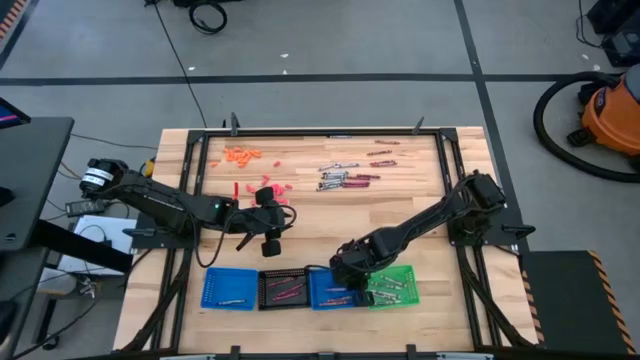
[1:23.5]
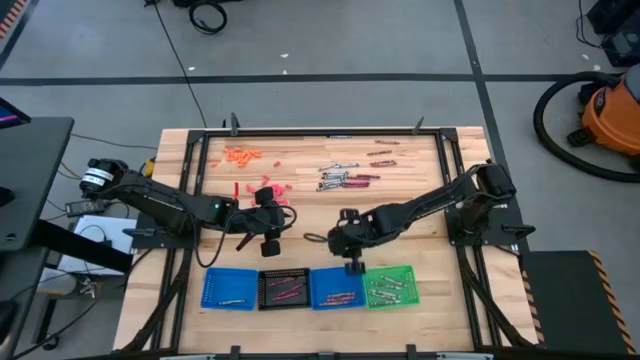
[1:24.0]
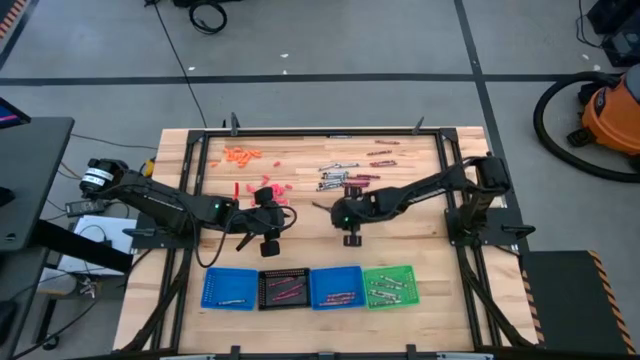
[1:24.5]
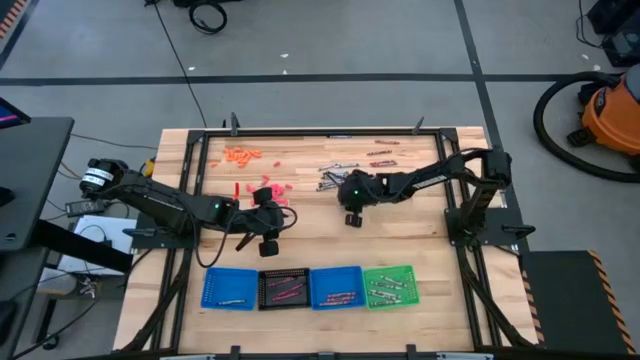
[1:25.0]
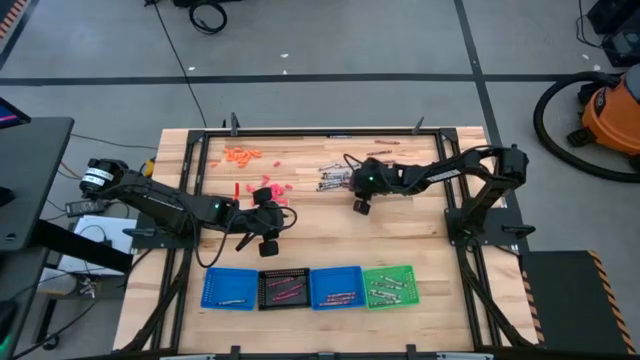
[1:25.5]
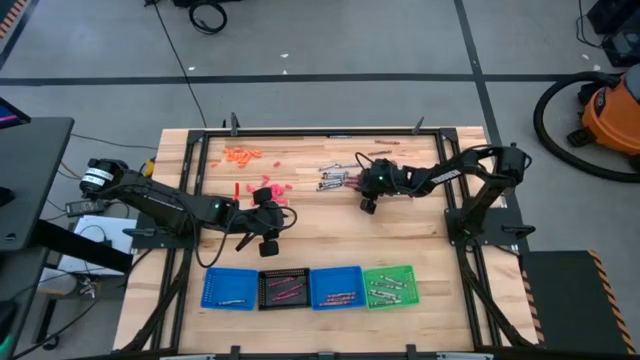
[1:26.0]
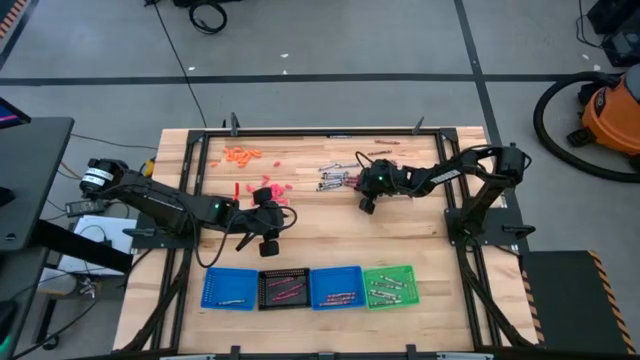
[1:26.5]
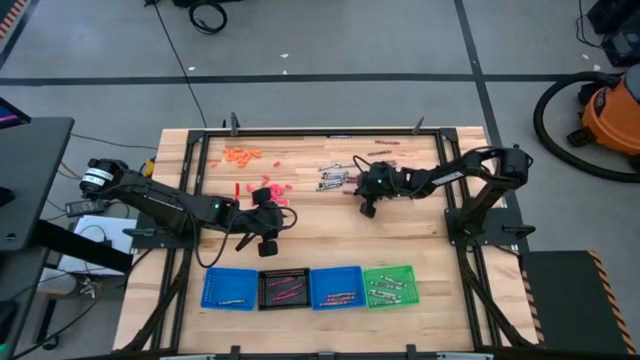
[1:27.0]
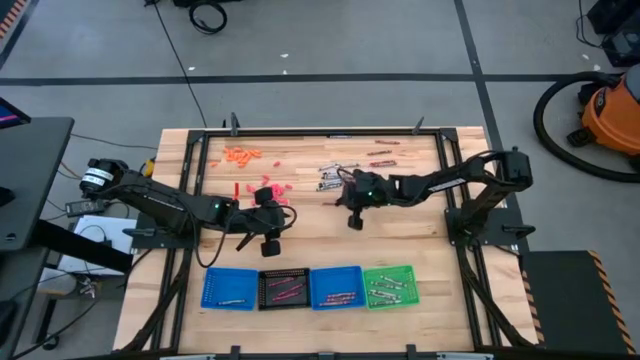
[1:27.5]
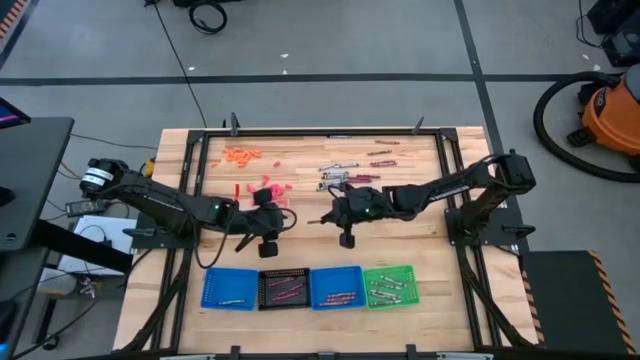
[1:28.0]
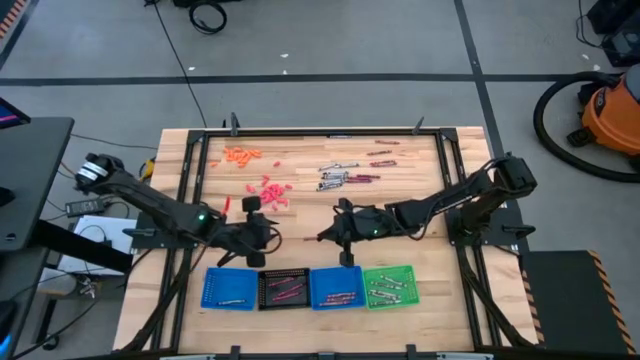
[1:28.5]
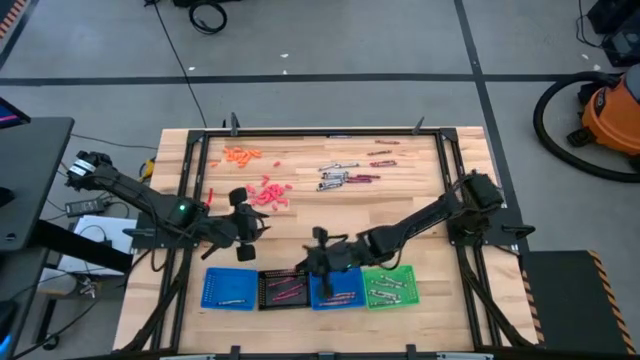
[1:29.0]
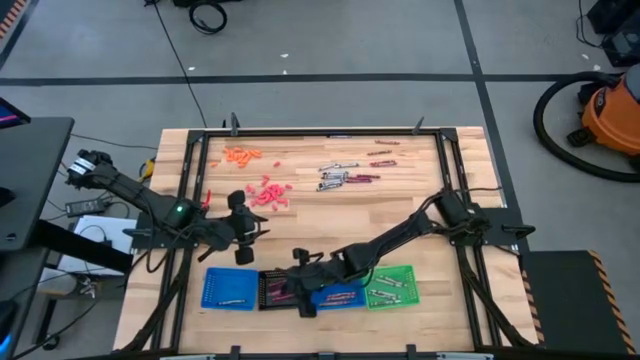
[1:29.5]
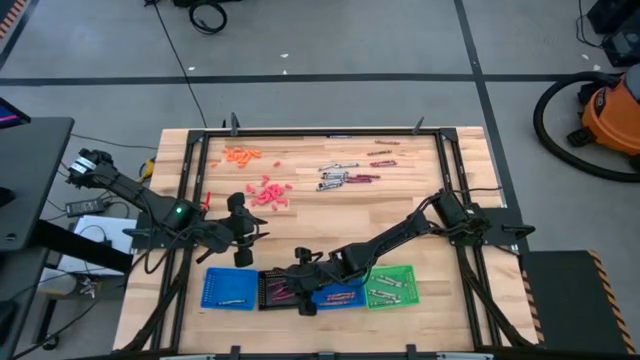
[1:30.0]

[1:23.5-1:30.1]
Task: Sort crayons
Put the dark pink crayon into the black bin

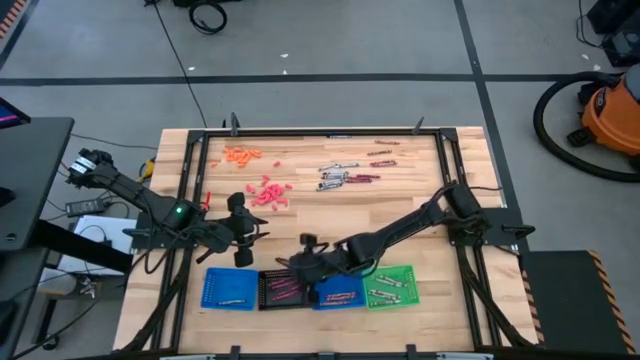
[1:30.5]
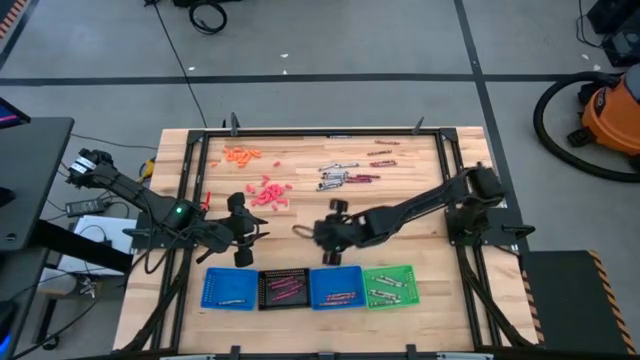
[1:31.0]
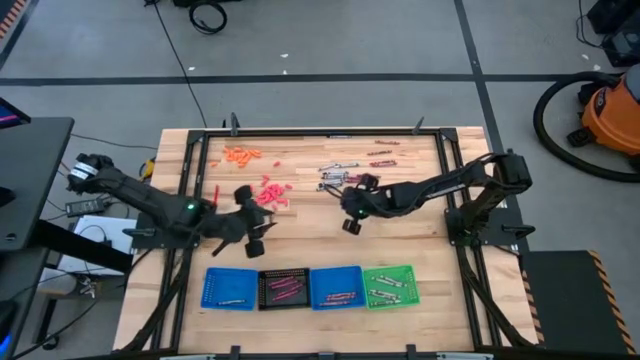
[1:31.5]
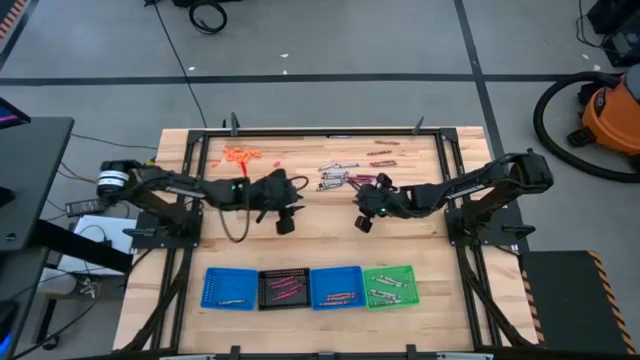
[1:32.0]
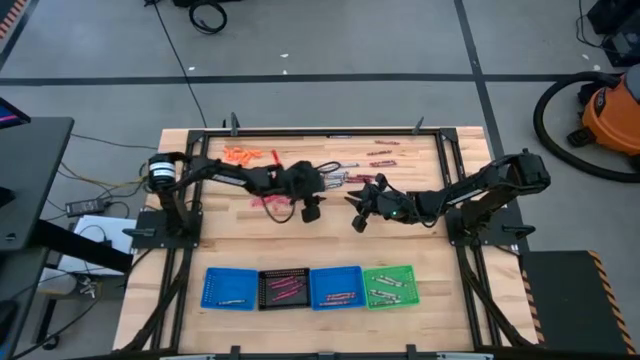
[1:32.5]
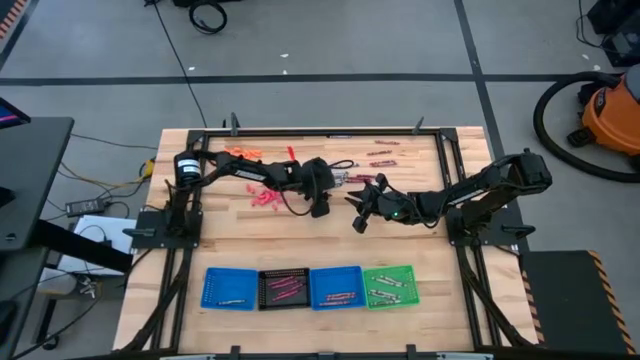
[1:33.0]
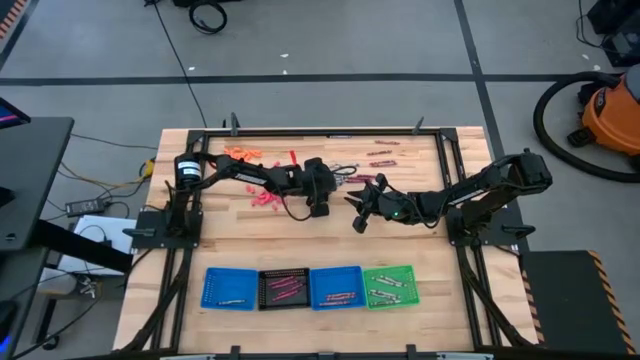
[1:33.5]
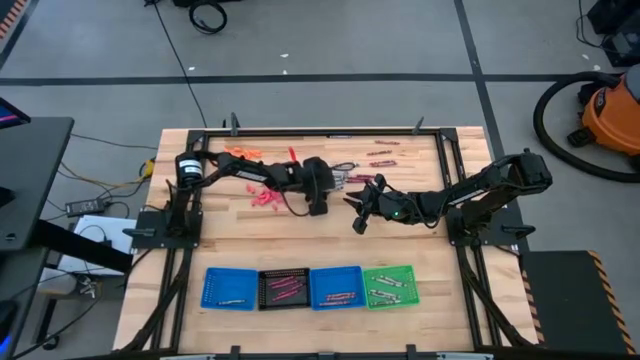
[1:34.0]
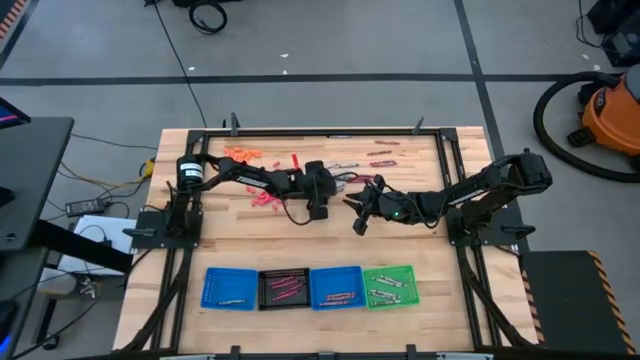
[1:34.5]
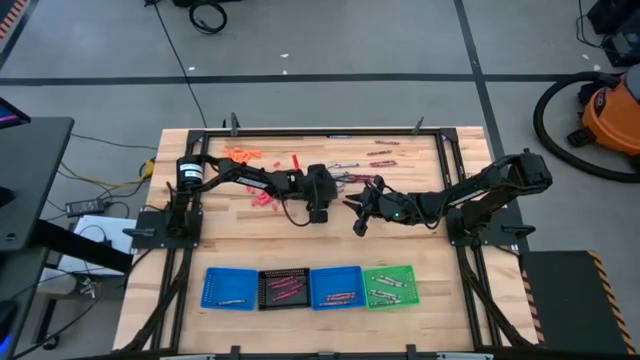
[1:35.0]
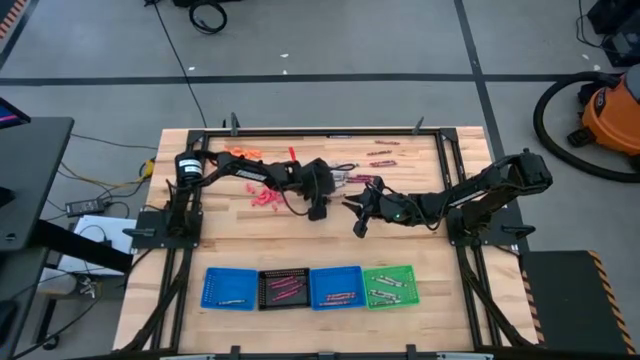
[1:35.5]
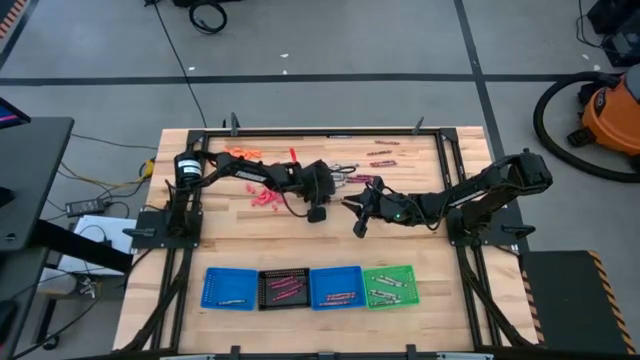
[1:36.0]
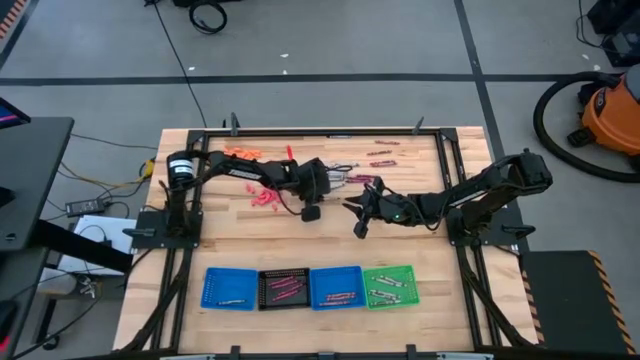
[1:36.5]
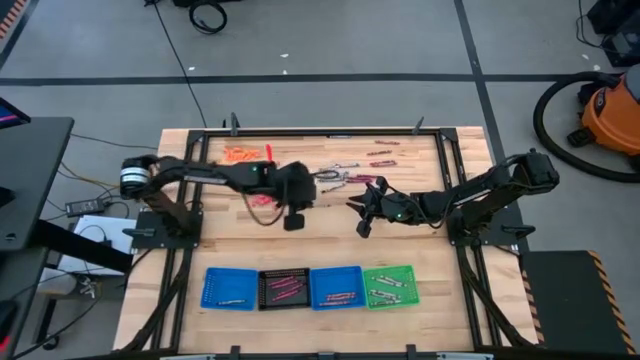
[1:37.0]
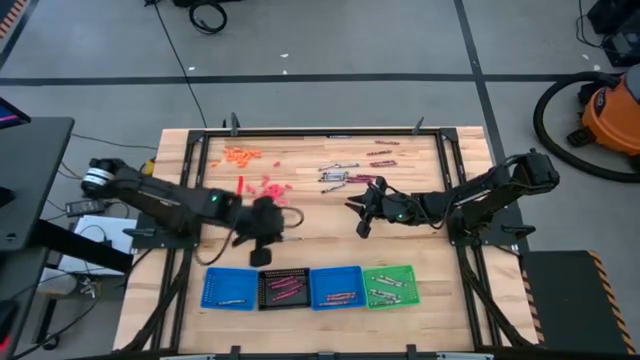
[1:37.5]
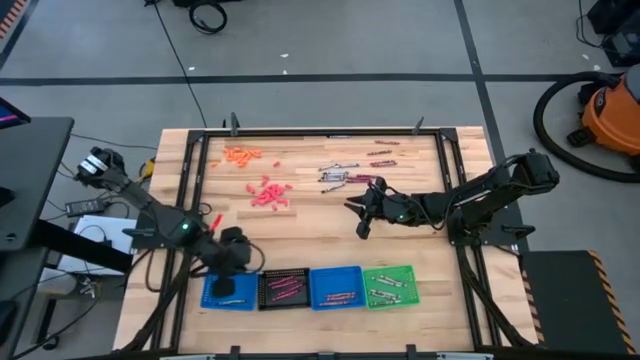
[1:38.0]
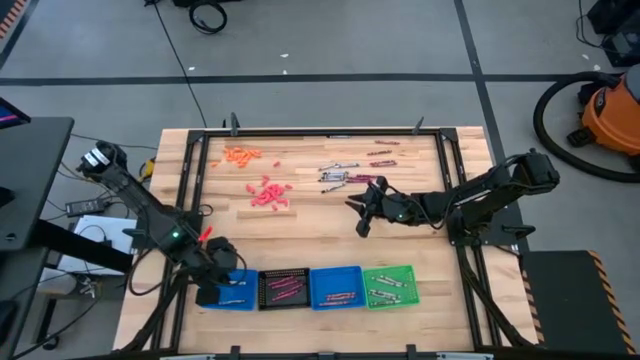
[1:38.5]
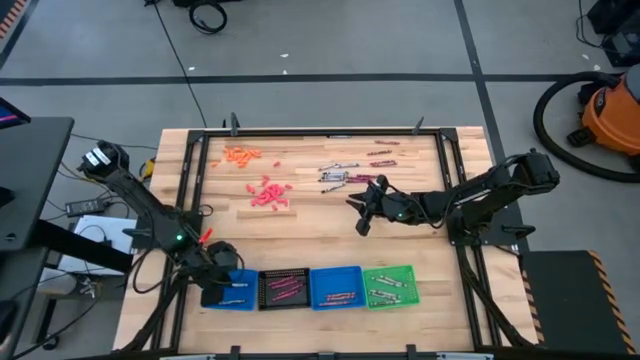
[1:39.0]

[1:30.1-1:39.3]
Put the black crayon into the left blue bin

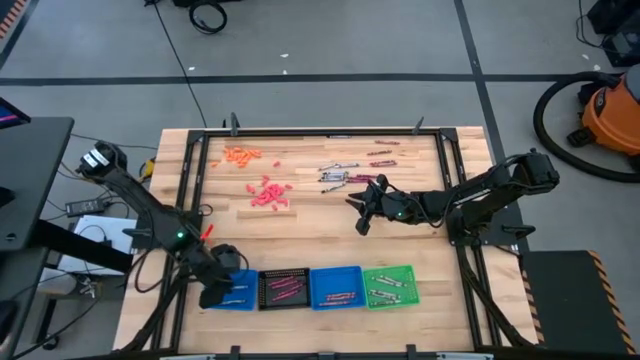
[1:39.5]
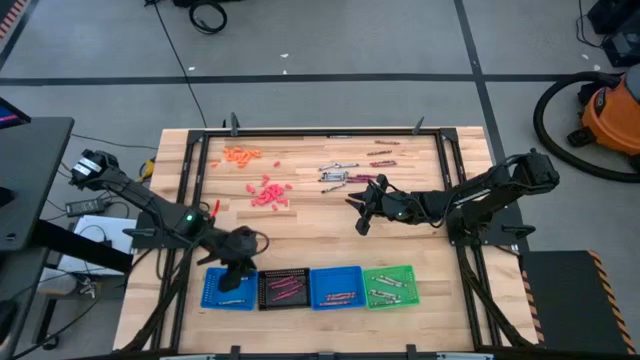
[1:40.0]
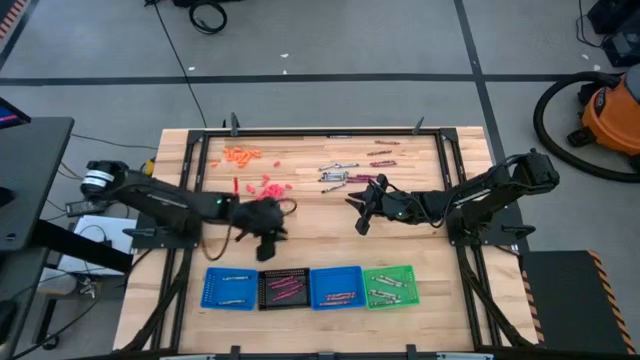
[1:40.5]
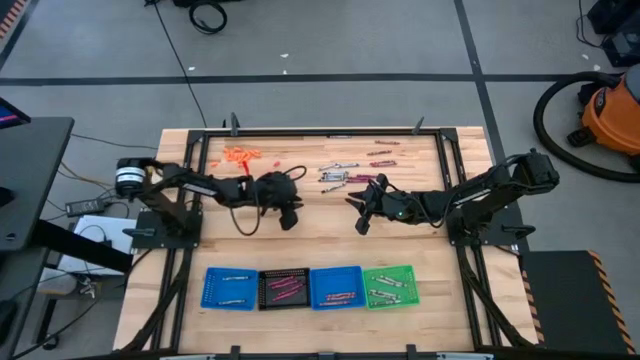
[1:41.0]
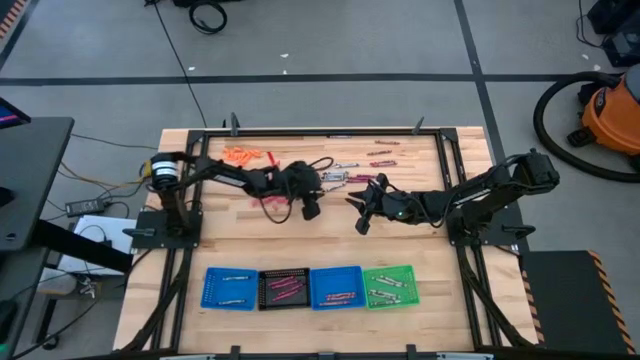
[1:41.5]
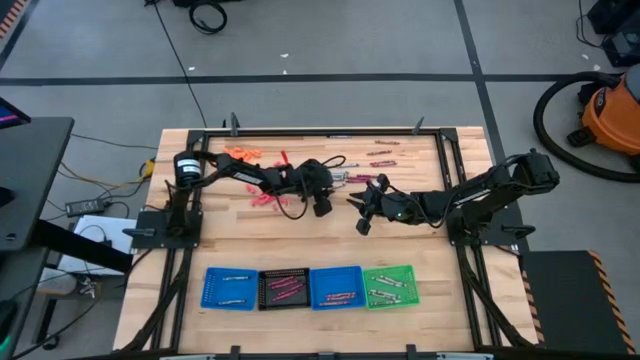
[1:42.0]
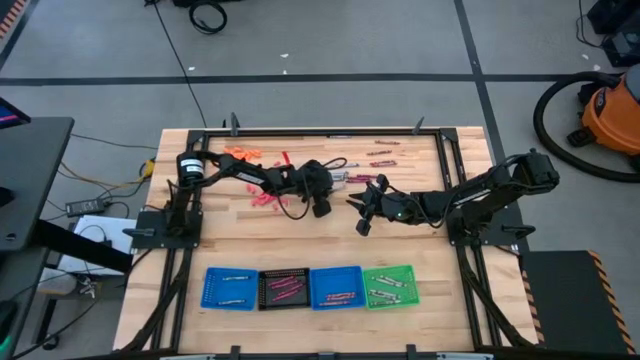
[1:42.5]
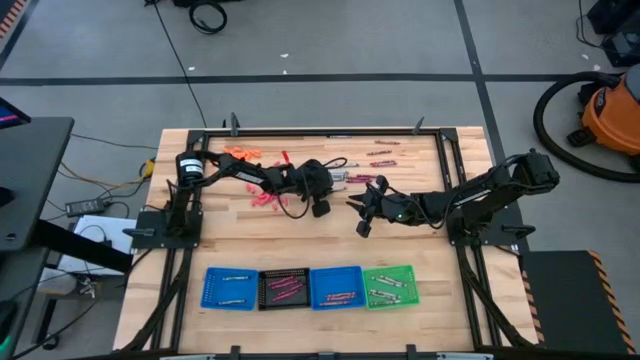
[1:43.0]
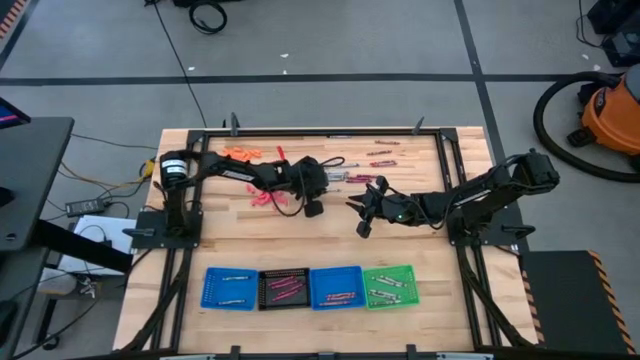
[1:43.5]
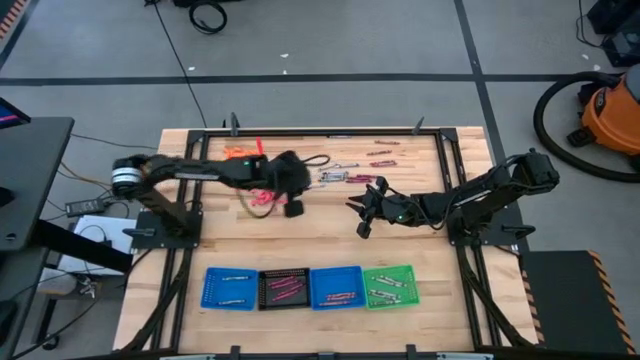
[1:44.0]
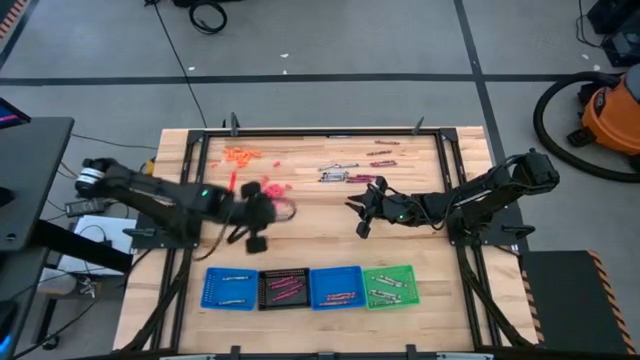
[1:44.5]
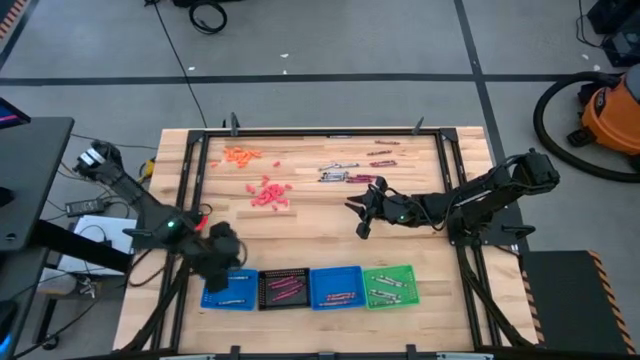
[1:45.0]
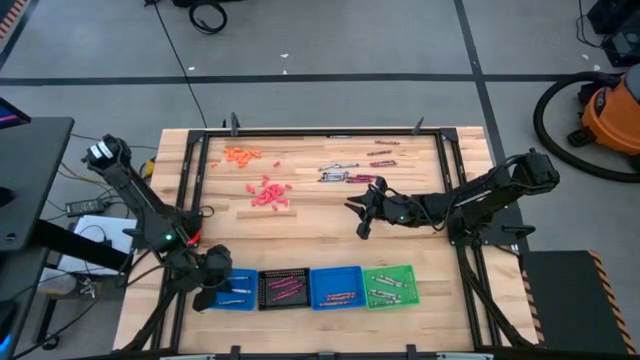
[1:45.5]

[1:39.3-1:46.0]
Put the black crayon into the left blue bin
